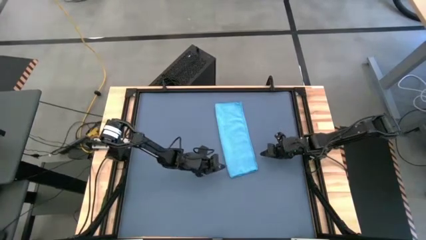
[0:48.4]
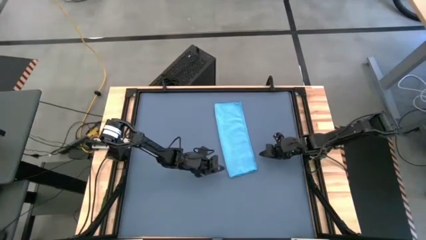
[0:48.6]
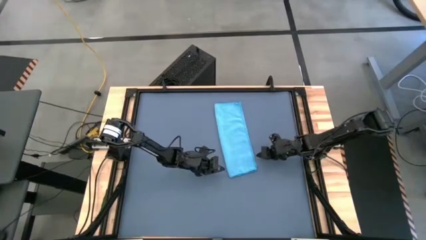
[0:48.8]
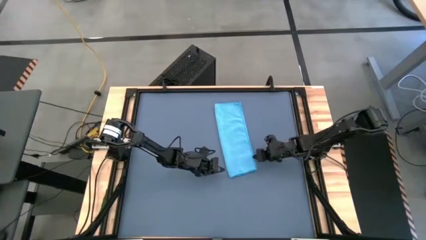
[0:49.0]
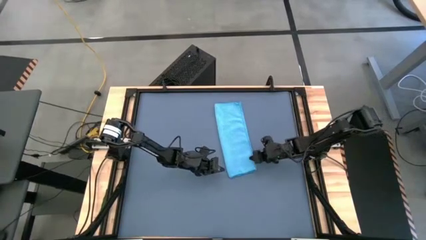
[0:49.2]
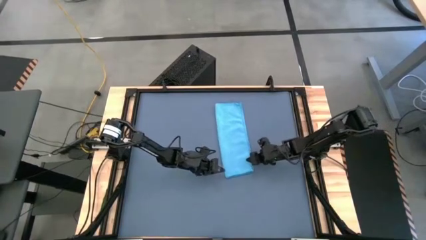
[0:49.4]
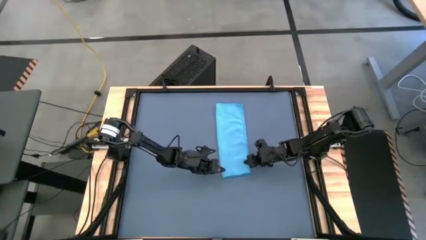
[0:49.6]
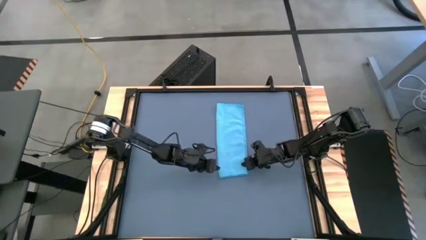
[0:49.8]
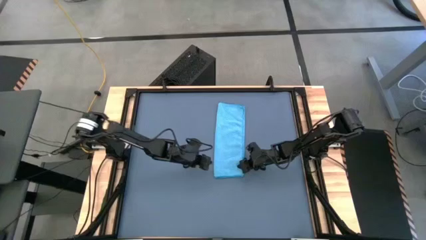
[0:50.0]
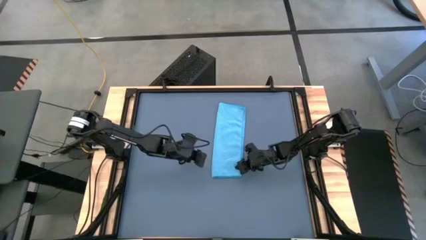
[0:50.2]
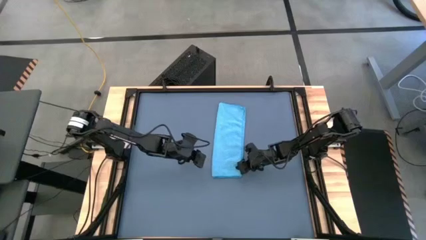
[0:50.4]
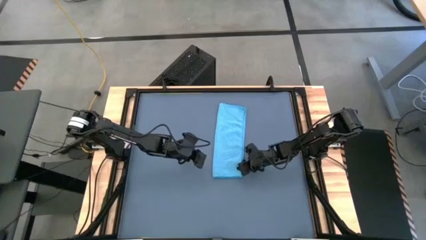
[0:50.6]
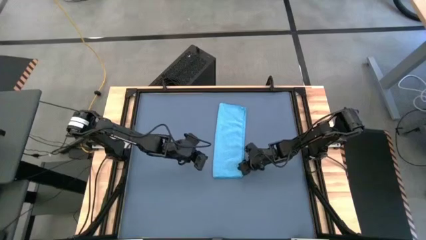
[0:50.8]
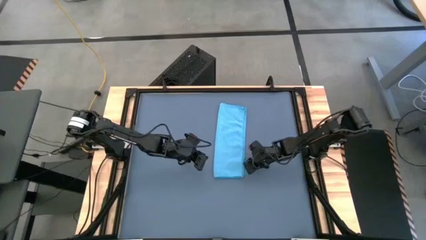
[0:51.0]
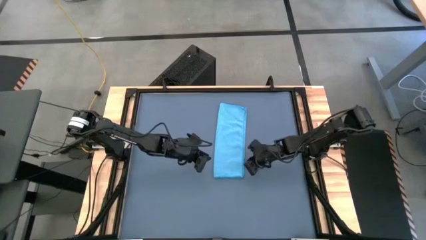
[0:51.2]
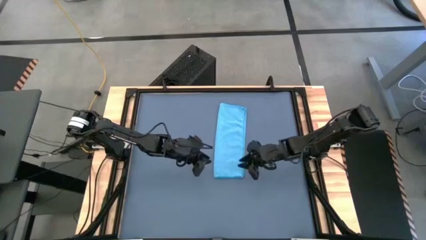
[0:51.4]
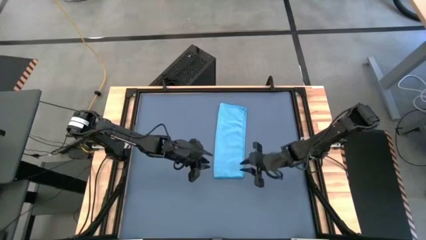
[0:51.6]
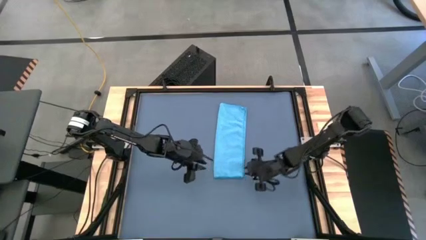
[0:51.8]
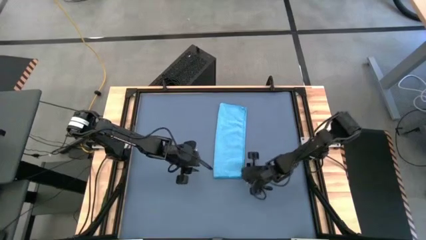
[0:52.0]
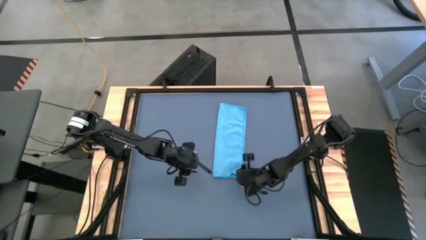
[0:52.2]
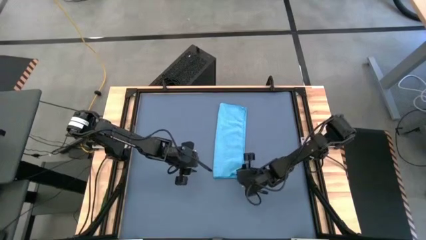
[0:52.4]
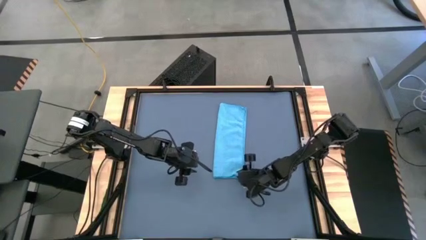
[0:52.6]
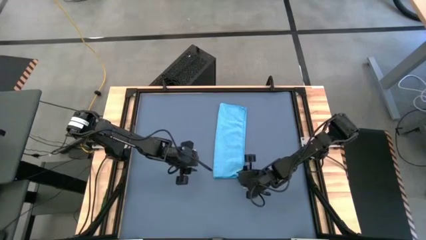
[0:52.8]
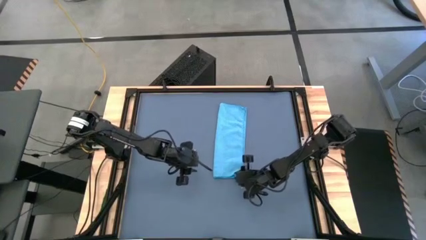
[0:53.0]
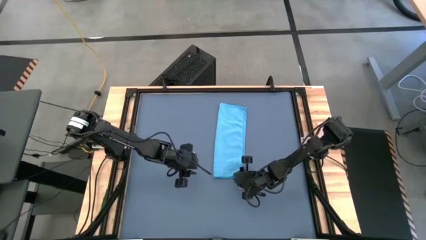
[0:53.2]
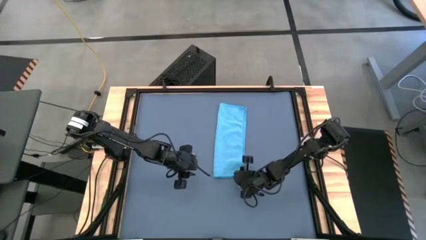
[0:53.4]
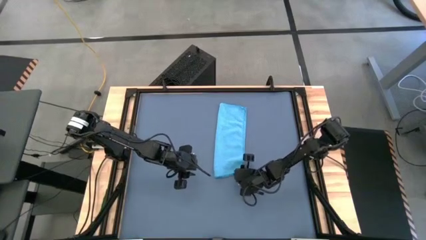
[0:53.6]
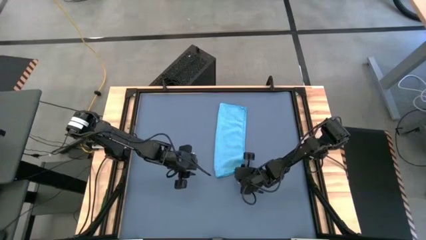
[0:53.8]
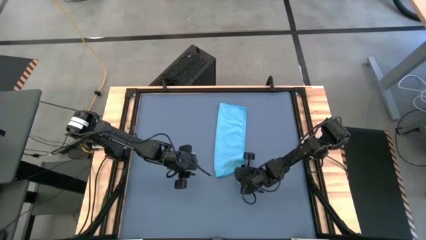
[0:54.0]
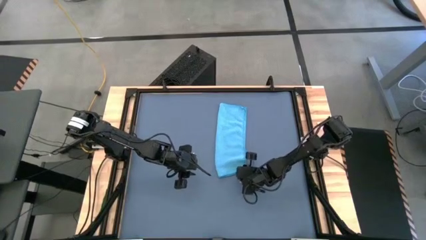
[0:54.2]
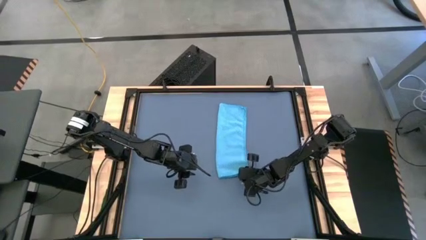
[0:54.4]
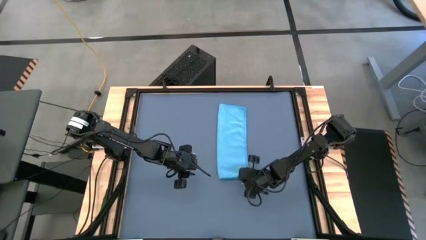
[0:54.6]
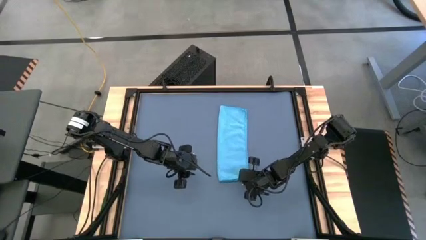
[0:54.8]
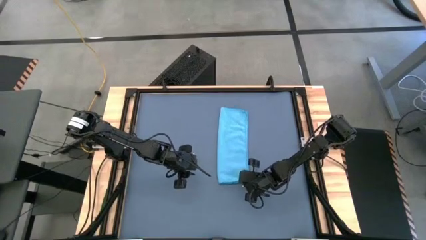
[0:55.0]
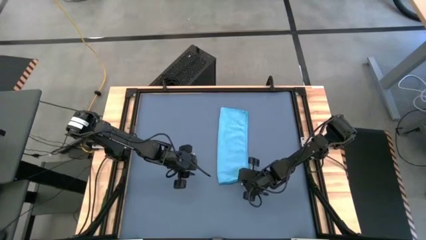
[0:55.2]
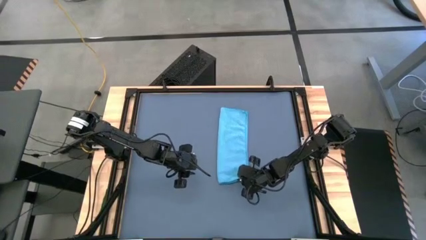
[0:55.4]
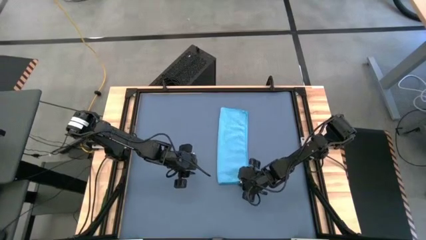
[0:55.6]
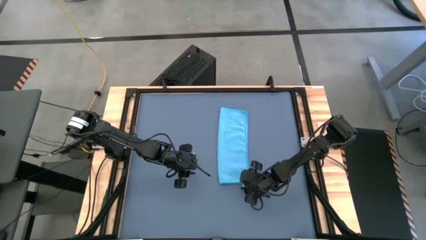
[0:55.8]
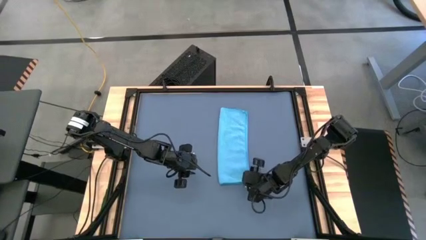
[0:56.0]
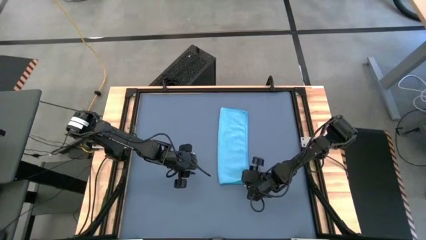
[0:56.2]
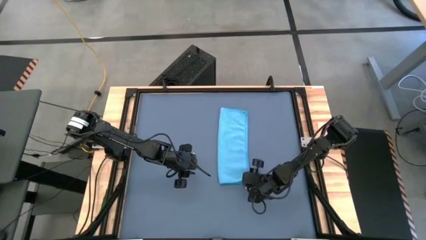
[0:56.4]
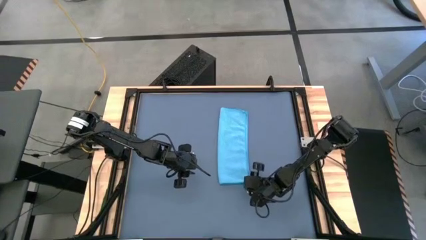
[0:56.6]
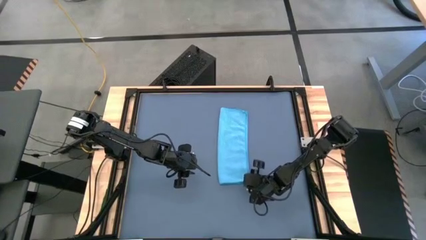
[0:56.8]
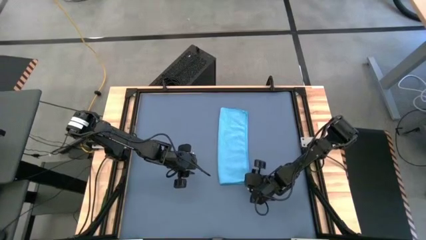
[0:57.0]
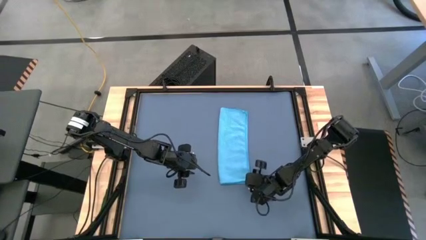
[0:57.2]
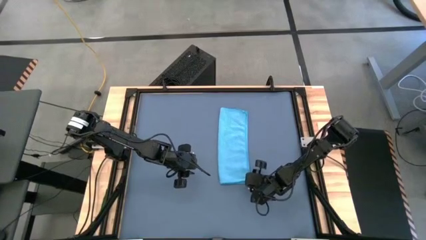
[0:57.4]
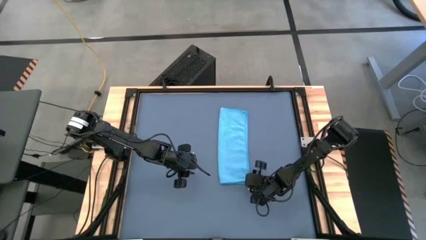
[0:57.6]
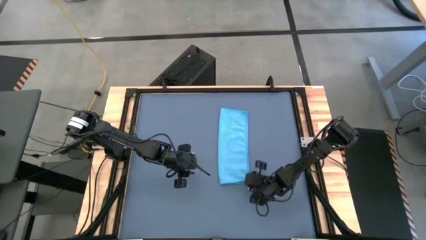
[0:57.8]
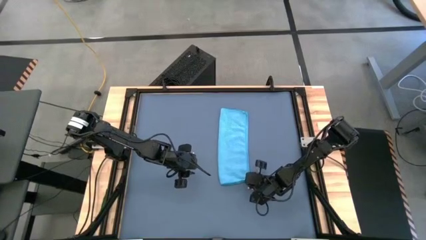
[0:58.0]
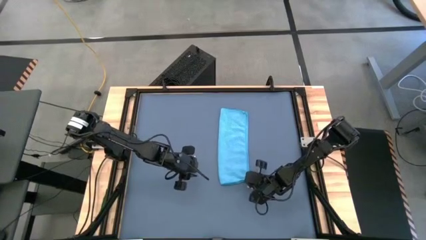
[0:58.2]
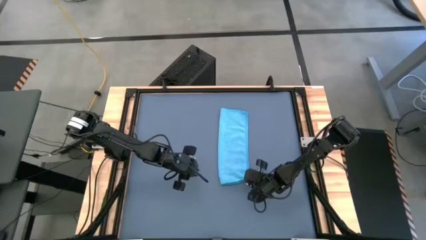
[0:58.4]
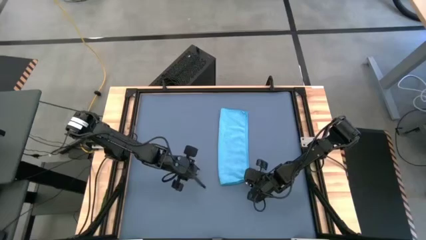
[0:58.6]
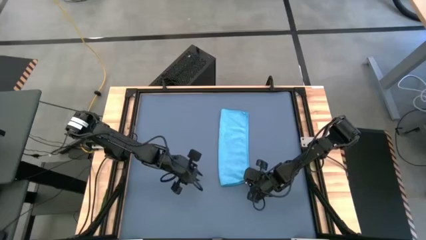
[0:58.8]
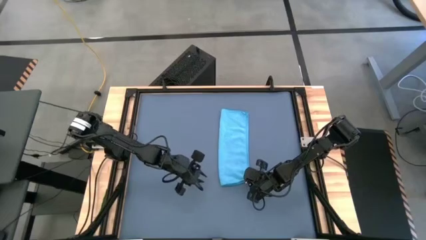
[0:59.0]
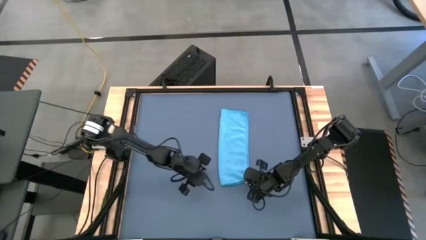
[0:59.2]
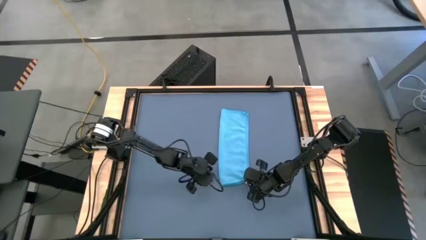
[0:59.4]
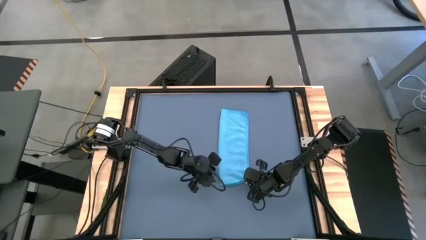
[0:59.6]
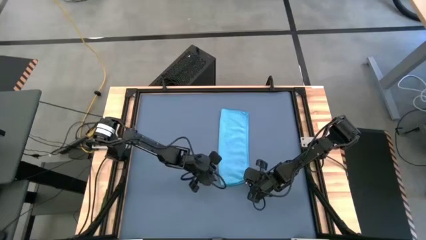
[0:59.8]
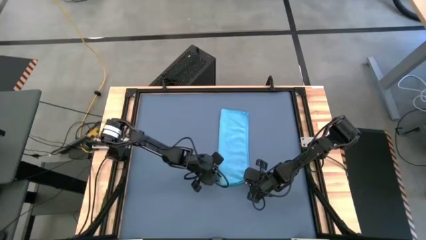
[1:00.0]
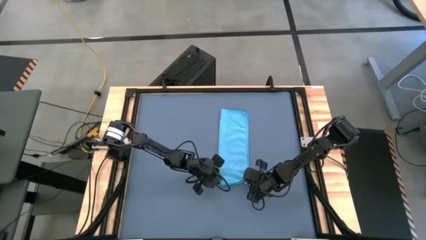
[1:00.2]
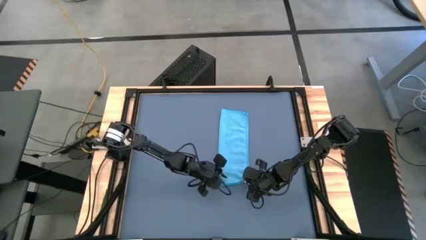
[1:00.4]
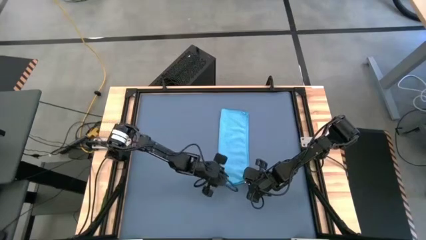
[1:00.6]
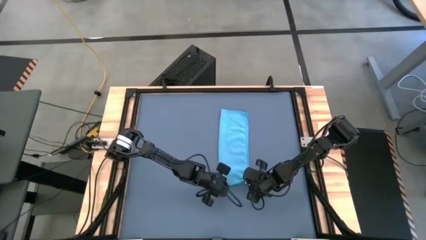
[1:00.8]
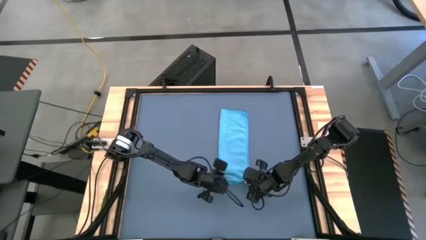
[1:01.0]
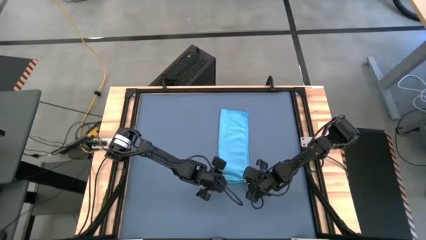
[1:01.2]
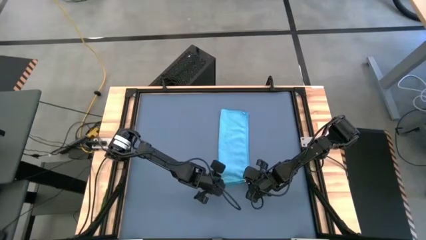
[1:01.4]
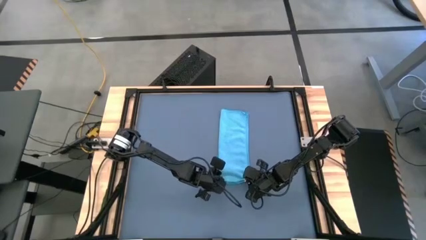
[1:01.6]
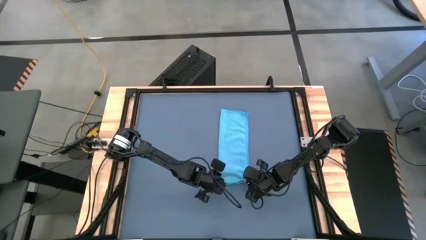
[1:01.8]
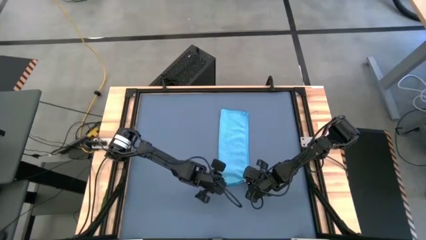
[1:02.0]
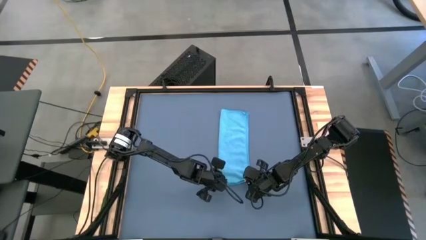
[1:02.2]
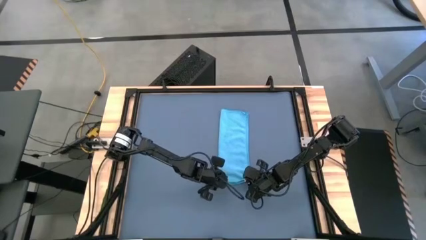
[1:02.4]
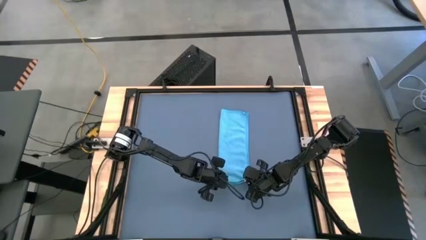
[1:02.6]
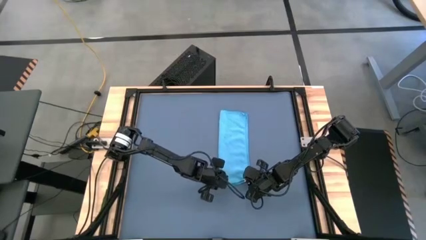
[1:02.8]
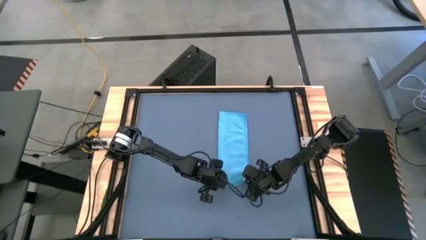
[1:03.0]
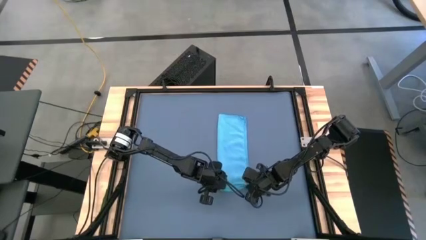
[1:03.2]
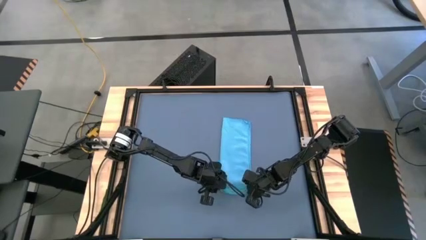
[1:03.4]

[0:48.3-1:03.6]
Task: Roll towel
Roll the blue microfiber towel

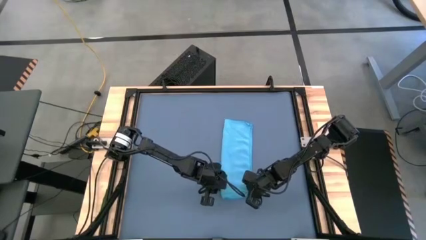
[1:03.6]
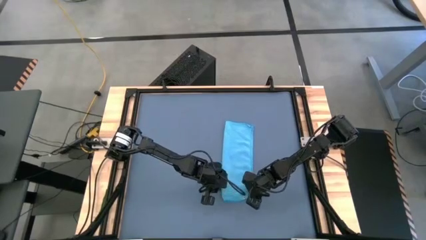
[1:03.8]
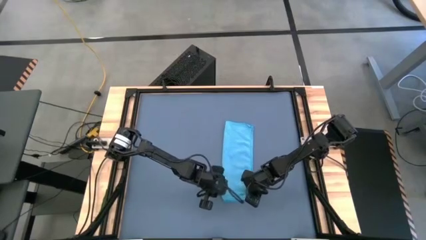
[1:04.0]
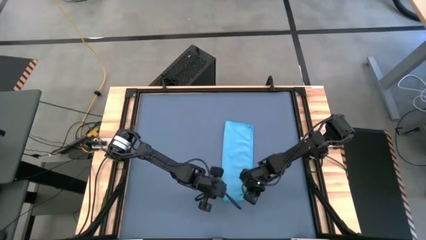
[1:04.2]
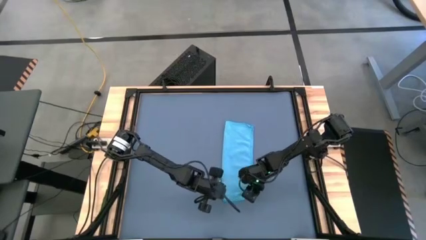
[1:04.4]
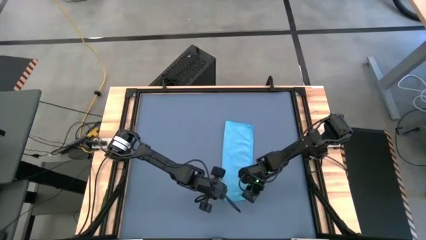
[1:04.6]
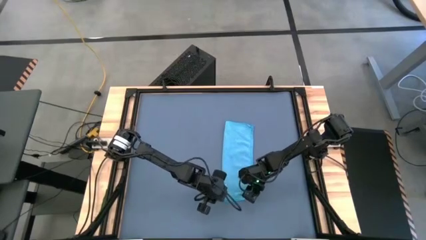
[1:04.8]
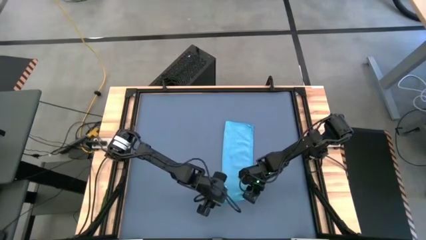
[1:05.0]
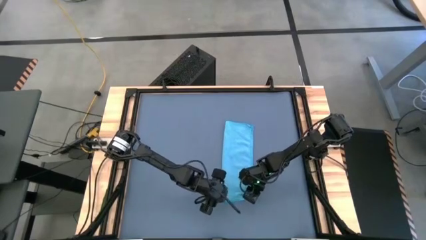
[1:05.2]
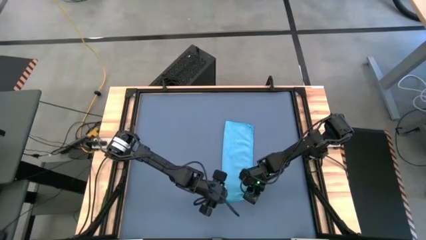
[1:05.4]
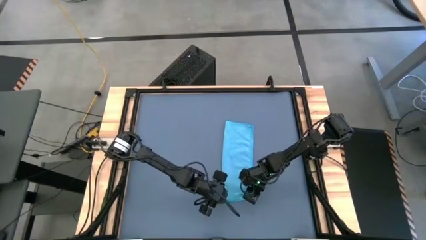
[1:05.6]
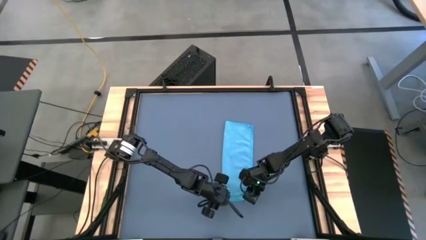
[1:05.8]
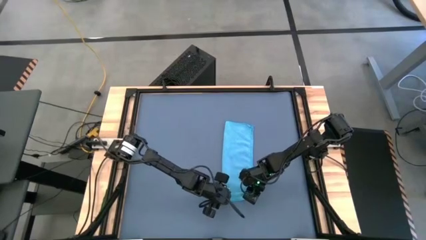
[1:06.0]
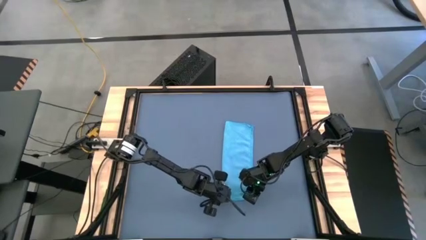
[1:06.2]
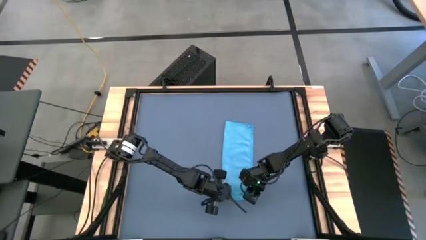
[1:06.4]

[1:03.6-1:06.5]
Roll the blue microfiber towel
